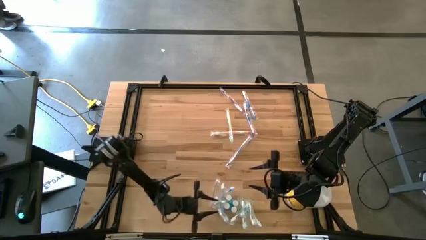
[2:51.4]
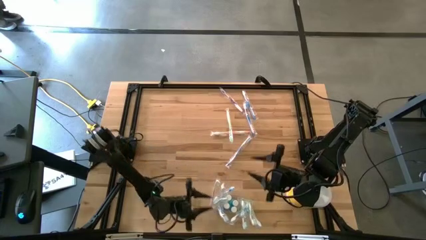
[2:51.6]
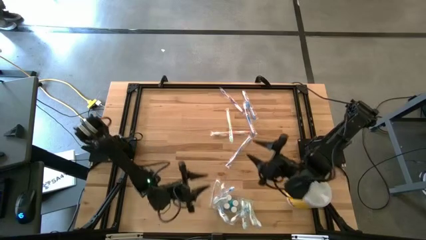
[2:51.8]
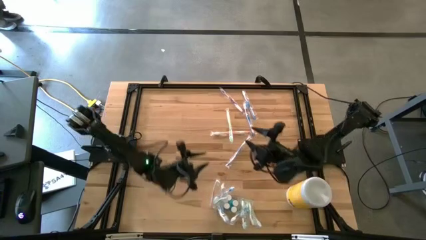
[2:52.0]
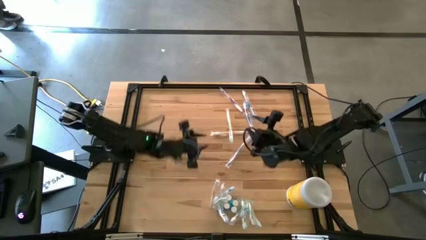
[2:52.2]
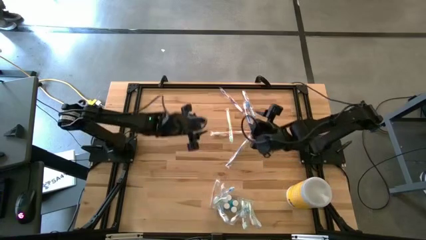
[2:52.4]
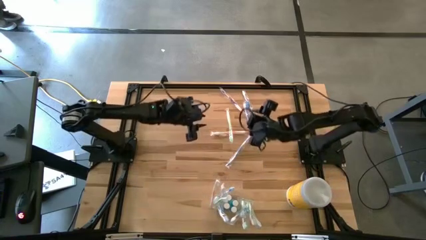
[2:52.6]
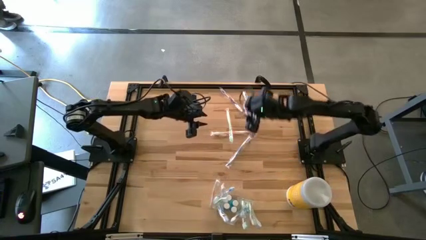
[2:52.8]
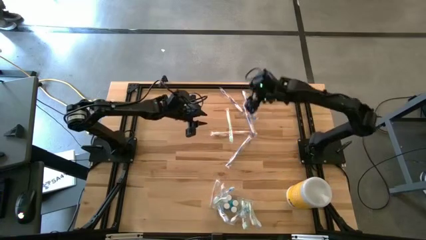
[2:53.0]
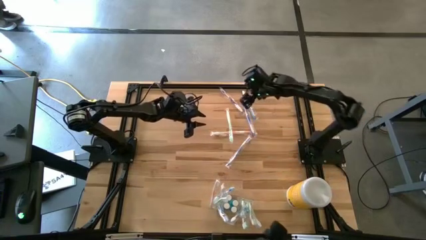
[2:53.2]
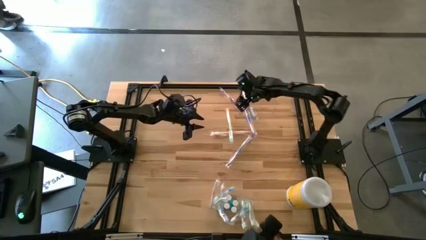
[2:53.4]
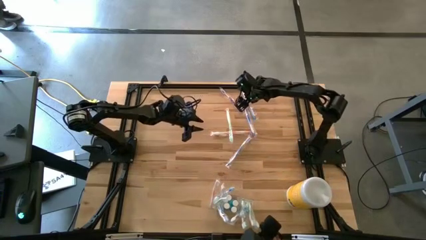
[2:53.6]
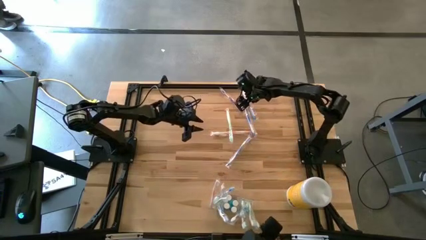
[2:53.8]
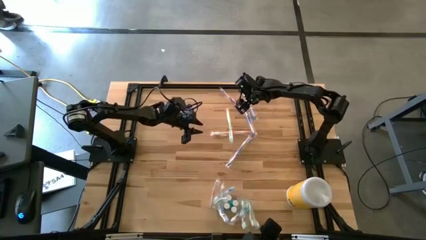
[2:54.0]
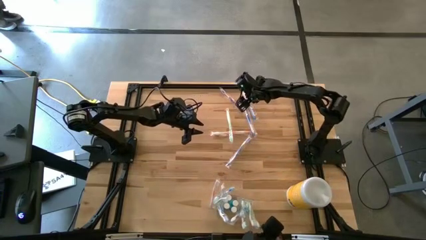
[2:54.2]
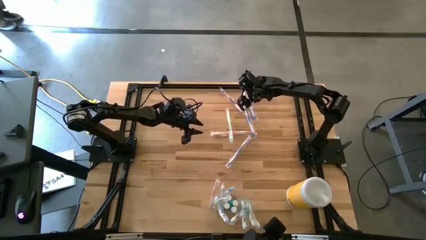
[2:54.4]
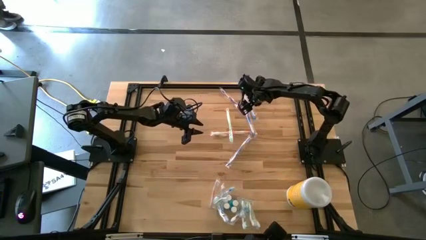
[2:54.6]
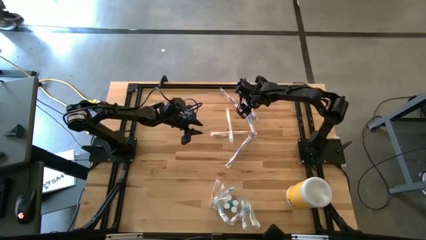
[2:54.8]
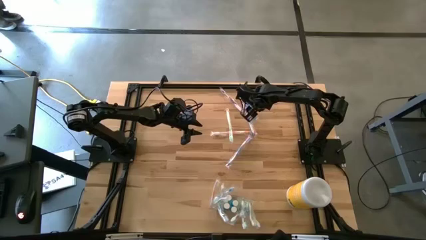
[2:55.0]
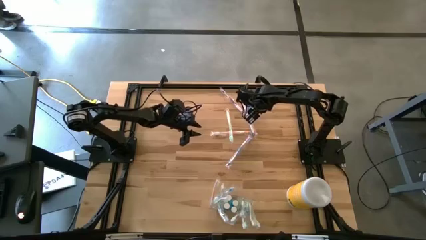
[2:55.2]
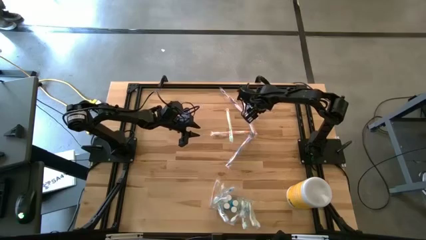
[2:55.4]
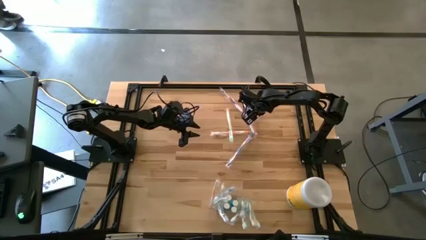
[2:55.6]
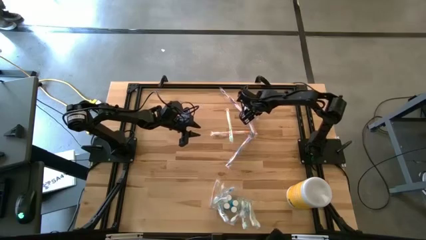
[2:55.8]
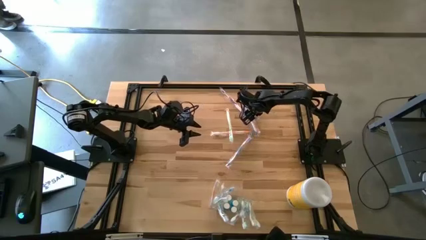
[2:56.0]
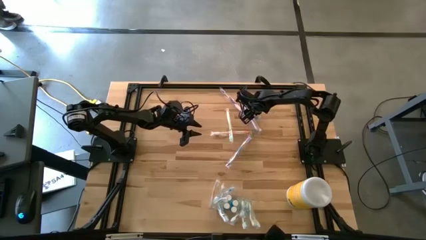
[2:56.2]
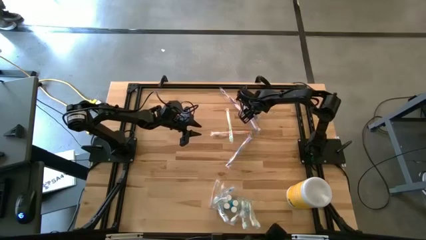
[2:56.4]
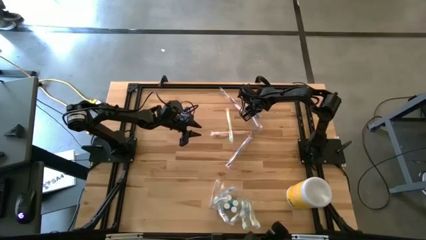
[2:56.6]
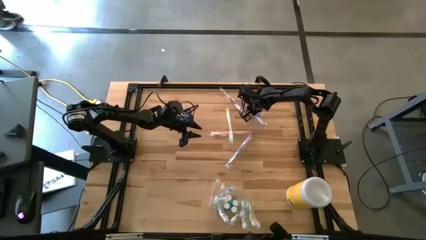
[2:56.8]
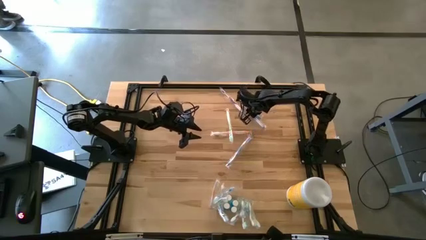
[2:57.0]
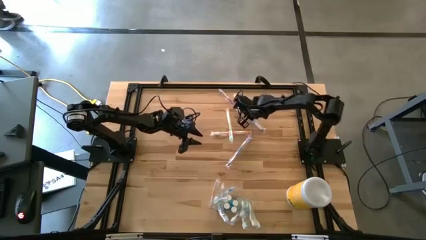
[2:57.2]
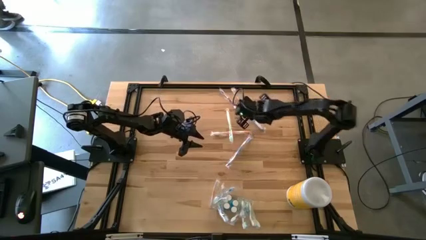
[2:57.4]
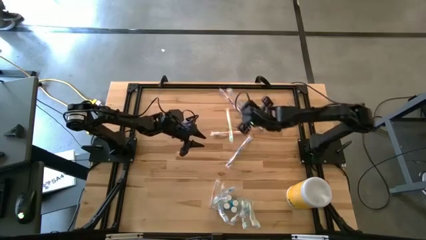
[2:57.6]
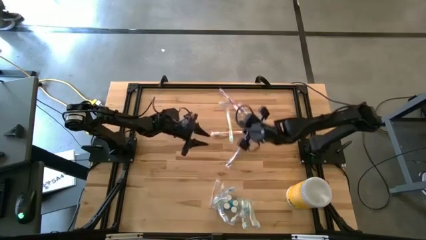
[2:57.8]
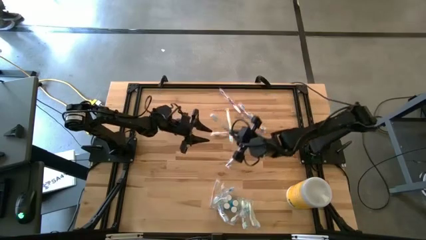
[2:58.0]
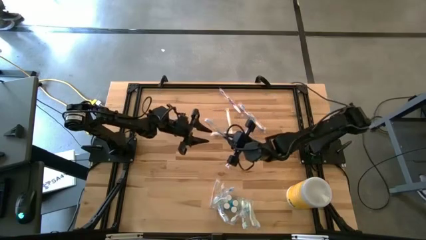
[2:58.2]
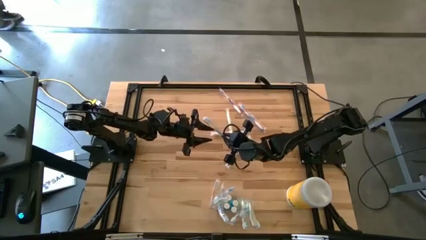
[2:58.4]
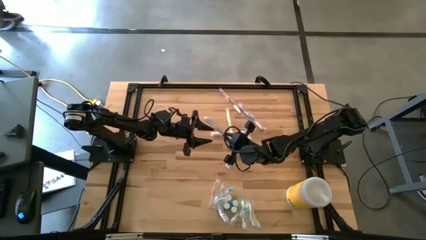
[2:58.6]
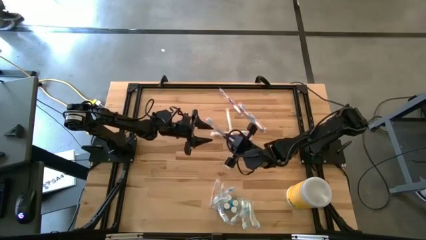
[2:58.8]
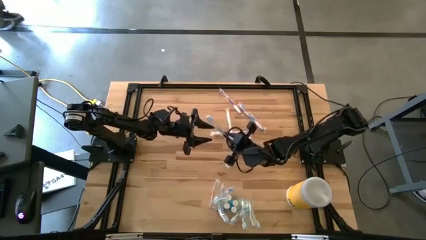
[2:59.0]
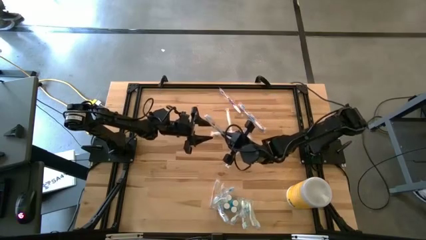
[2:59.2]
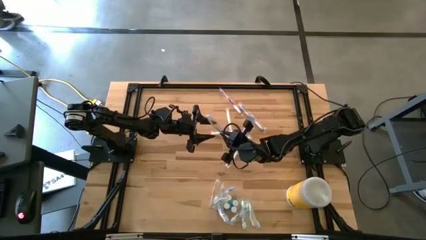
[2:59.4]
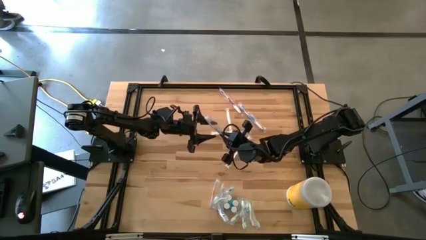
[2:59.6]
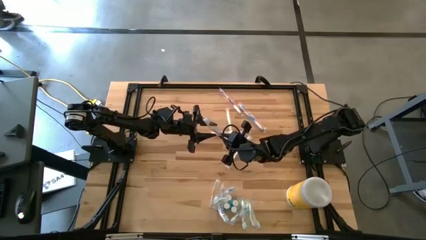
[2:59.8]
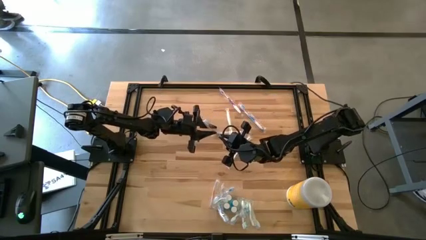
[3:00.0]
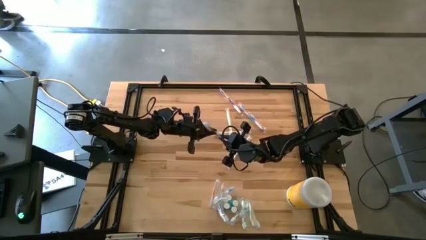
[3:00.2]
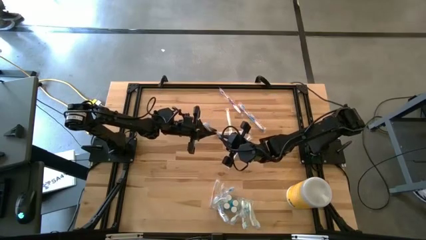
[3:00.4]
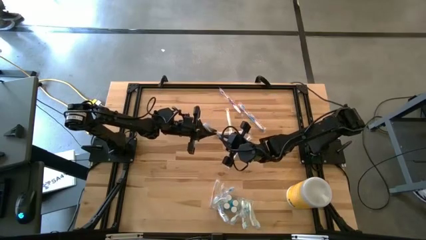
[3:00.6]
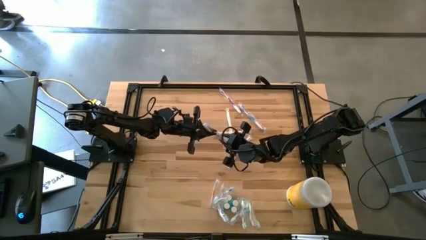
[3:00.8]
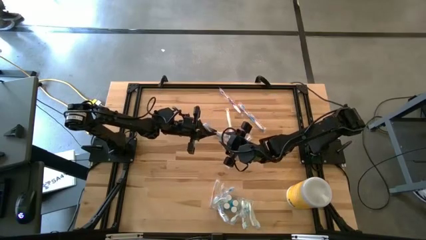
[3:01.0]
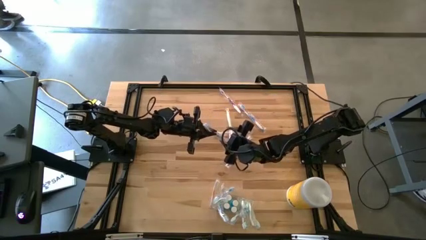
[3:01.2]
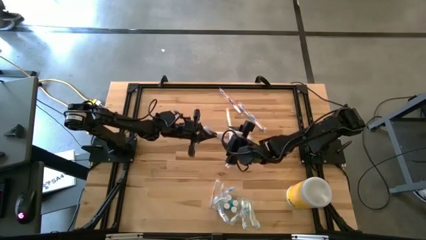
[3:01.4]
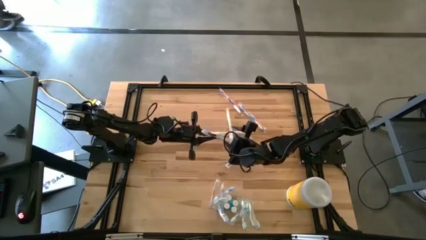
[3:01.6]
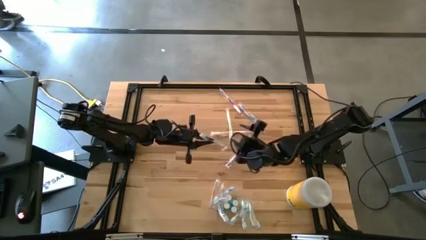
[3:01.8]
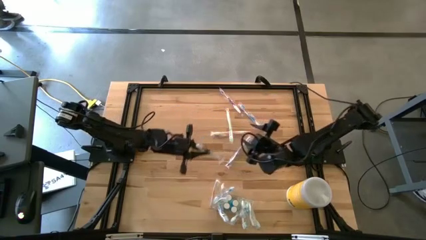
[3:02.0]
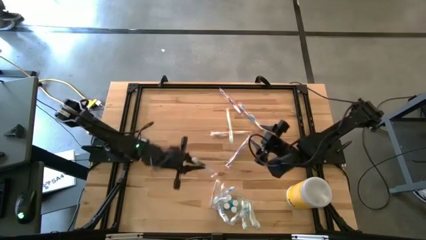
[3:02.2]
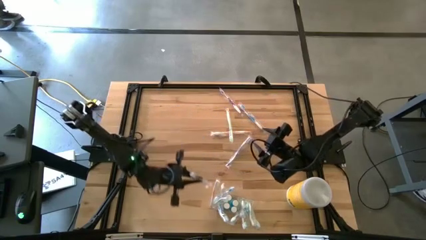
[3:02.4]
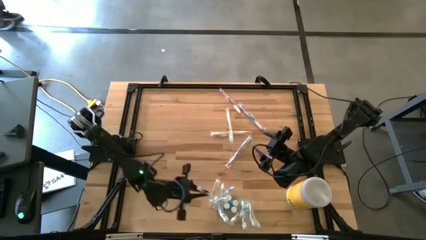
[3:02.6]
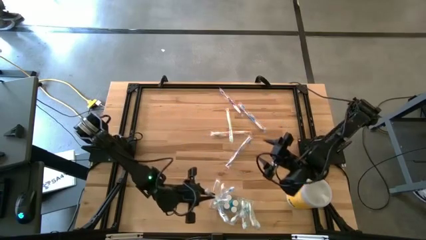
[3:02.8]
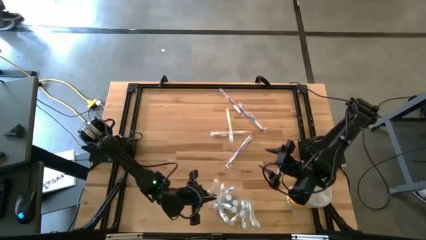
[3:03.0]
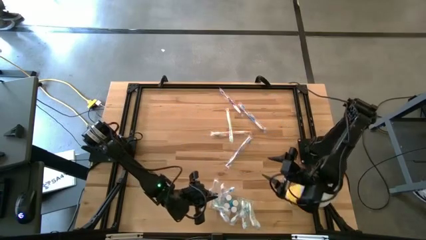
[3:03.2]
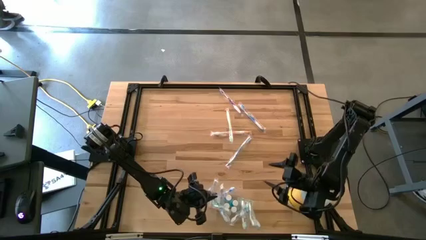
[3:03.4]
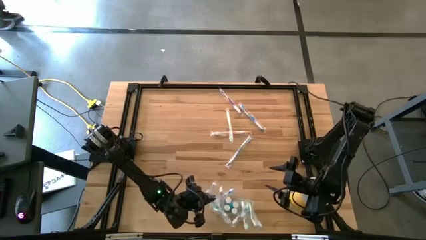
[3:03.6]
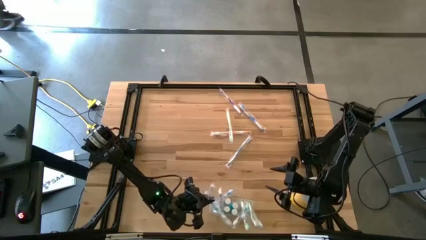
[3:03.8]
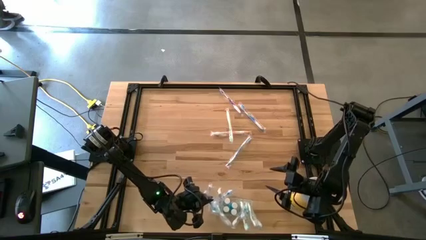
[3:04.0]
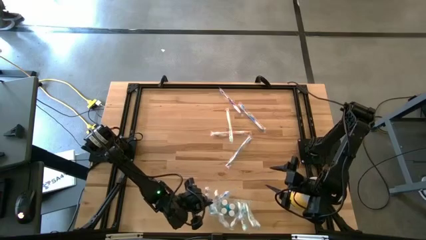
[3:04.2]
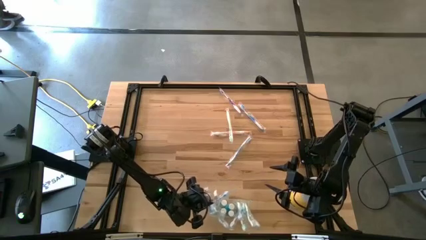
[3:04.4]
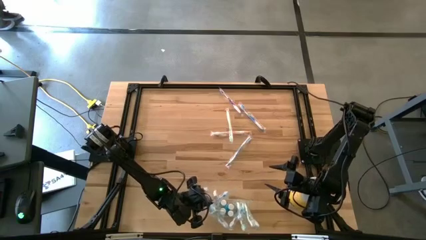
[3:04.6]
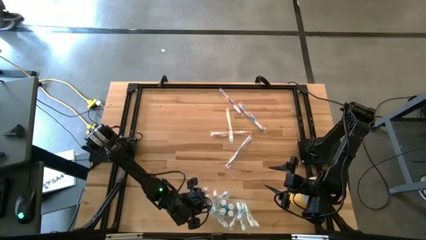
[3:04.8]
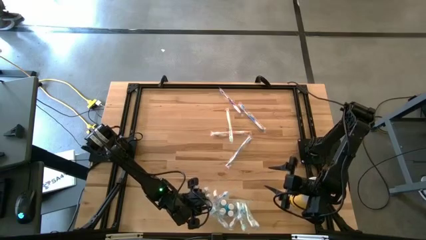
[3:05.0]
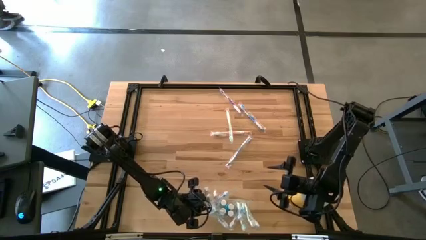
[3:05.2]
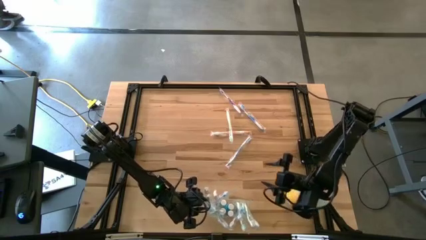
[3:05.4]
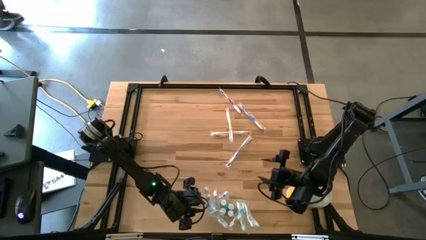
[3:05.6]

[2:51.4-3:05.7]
Task: Pick & Place toothbrushing station
Put the blue toothbrush into the transparent organizer

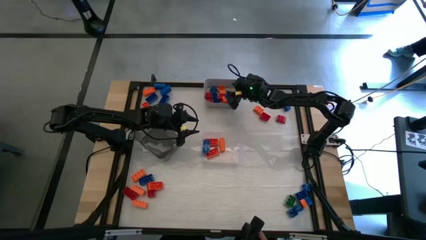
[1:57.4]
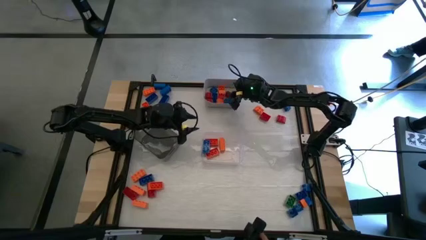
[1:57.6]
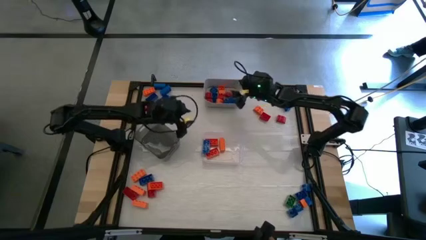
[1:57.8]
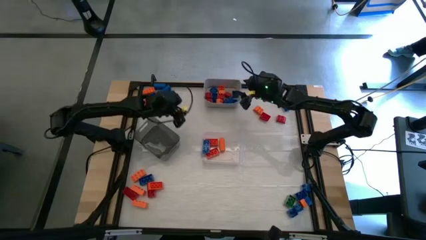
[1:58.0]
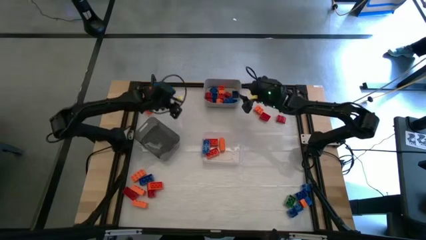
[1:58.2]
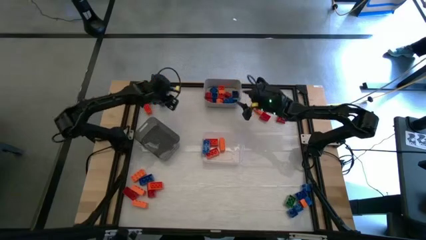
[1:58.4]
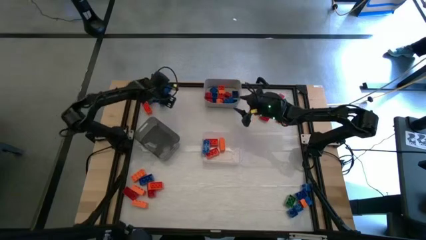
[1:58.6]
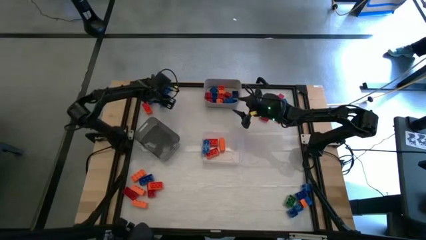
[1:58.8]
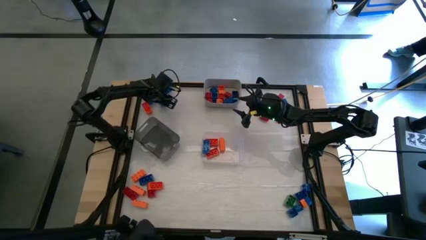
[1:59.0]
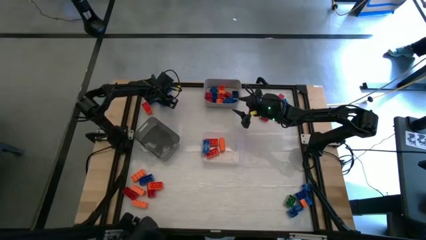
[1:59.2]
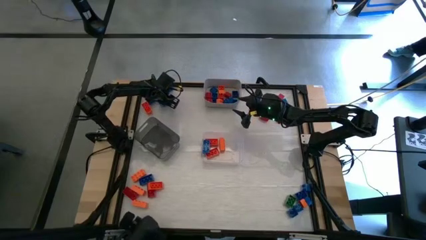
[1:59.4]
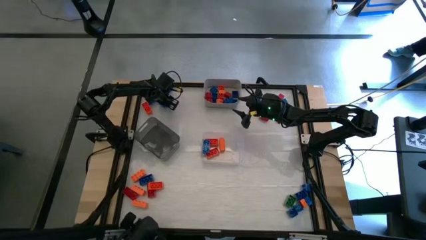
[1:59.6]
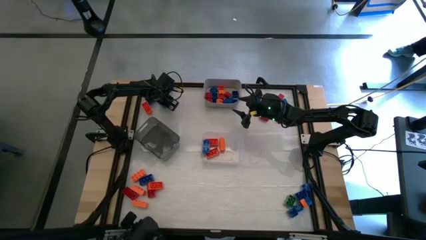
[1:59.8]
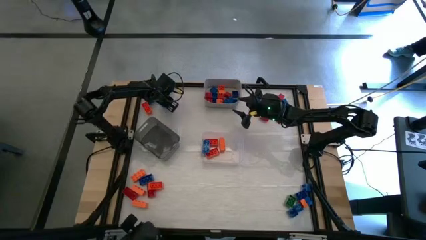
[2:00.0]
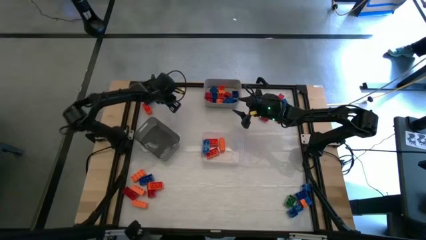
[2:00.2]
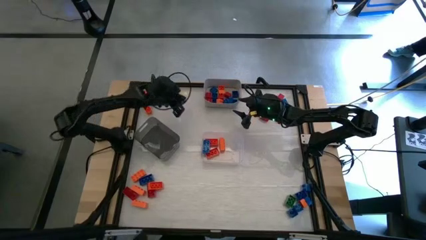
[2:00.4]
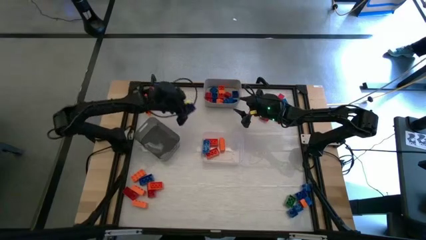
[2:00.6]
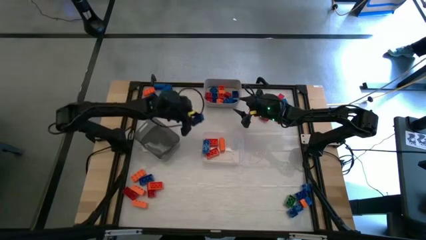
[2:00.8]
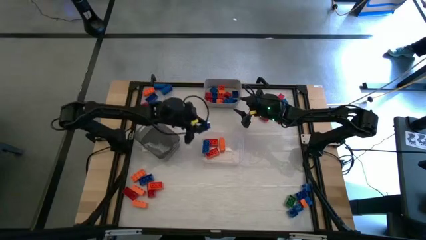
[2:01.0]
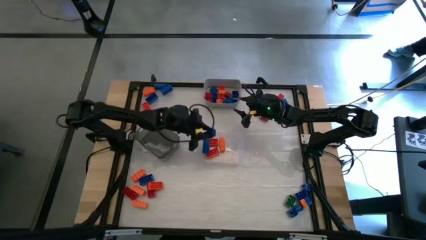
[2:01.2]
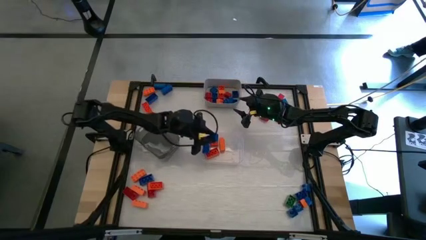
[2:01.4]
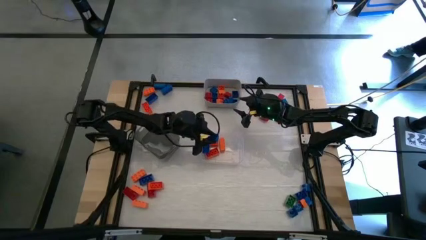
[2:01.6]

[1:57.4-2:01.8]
Task: Sort blocks by size
Put the big blue game piece into the transparent bin
